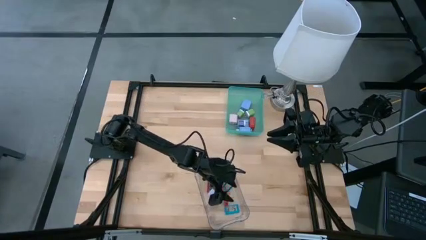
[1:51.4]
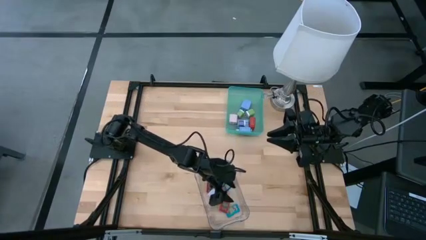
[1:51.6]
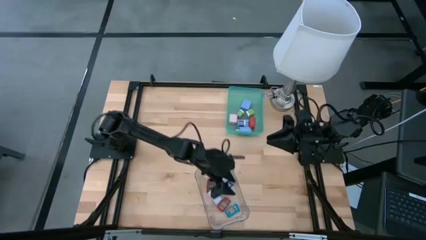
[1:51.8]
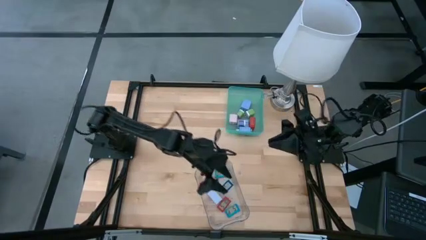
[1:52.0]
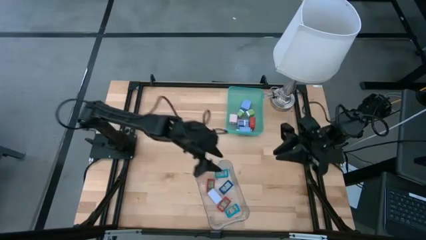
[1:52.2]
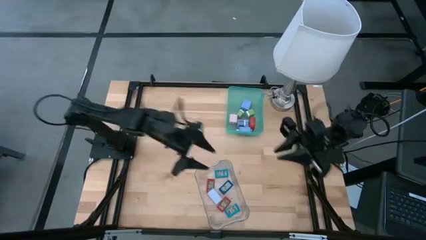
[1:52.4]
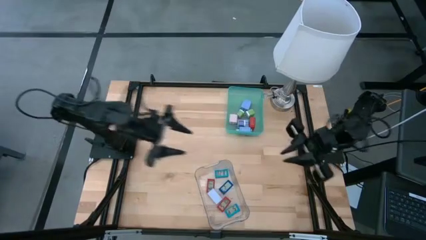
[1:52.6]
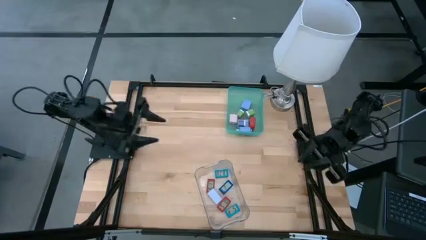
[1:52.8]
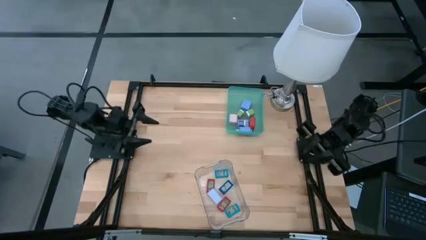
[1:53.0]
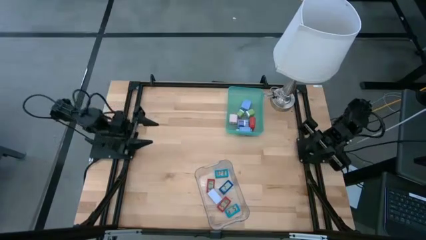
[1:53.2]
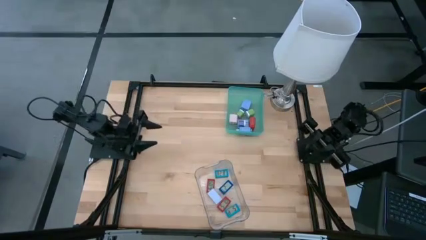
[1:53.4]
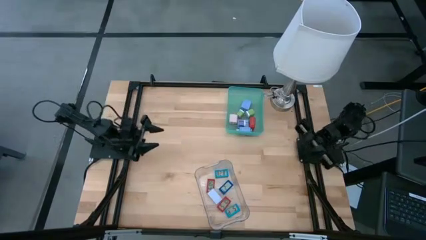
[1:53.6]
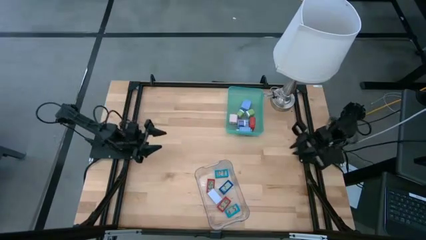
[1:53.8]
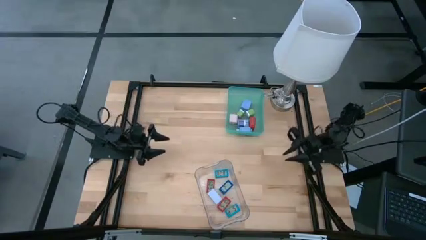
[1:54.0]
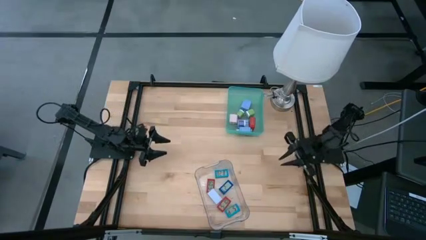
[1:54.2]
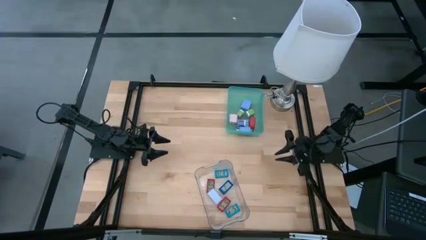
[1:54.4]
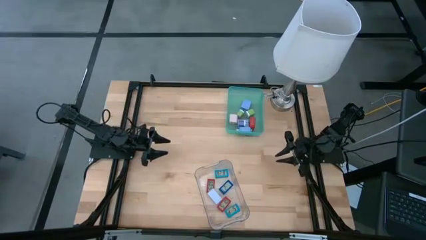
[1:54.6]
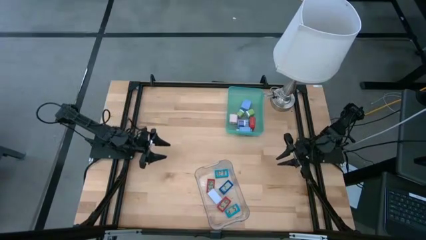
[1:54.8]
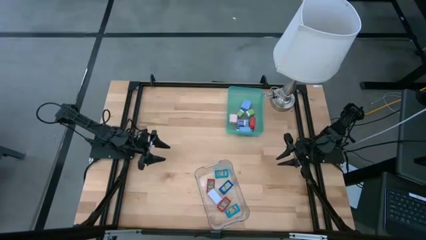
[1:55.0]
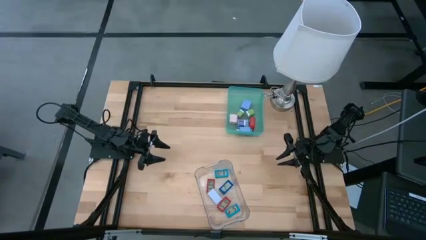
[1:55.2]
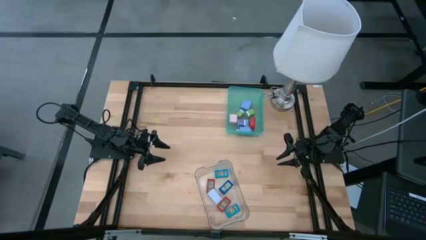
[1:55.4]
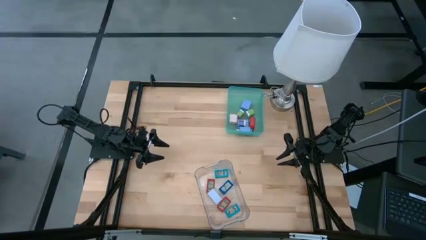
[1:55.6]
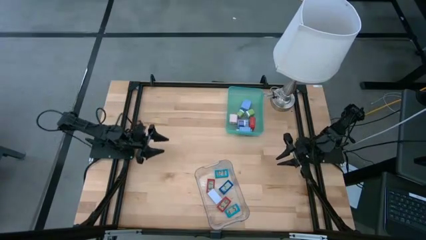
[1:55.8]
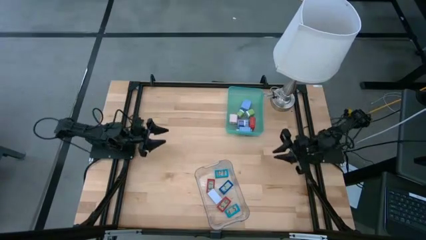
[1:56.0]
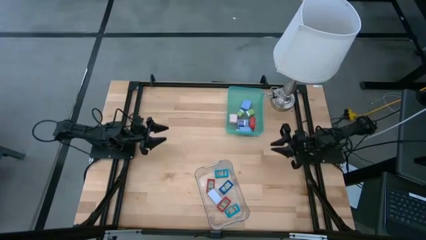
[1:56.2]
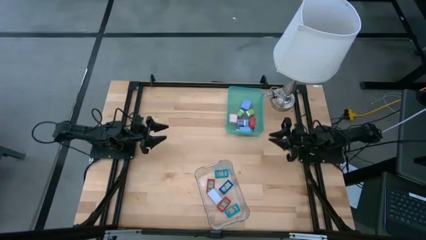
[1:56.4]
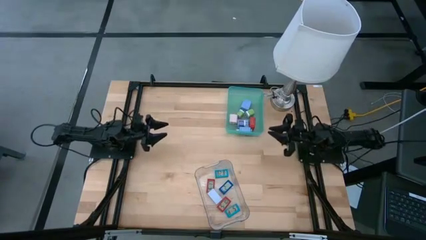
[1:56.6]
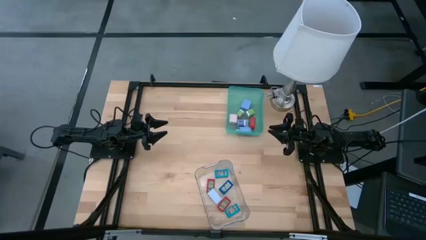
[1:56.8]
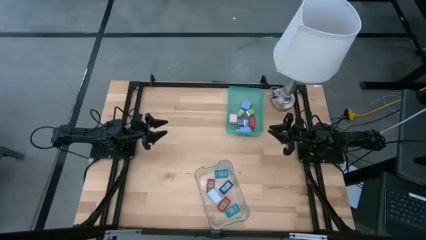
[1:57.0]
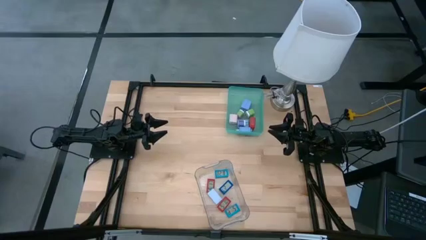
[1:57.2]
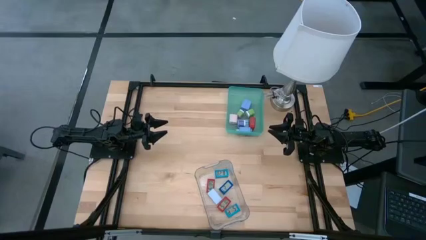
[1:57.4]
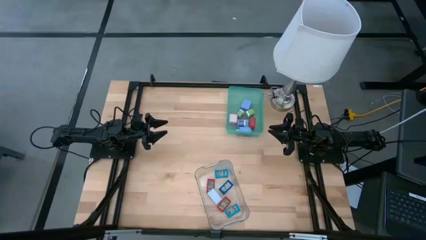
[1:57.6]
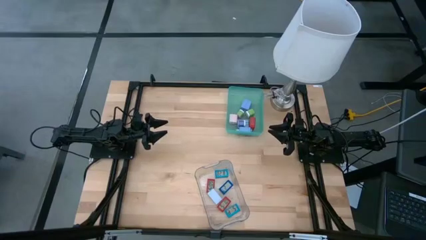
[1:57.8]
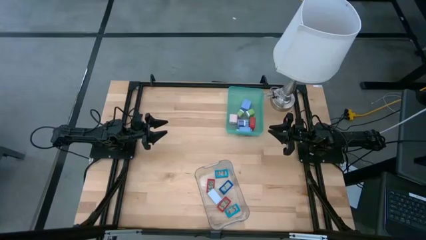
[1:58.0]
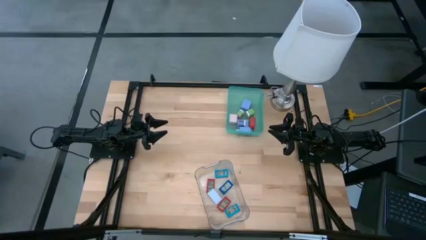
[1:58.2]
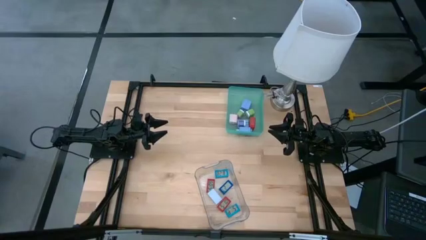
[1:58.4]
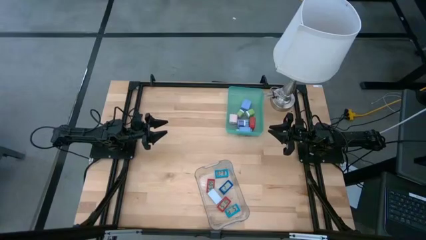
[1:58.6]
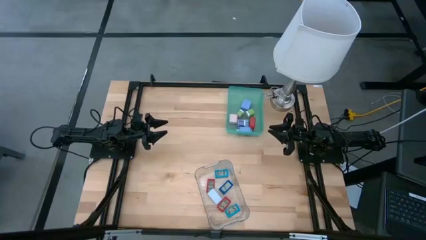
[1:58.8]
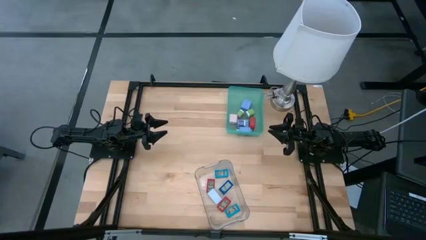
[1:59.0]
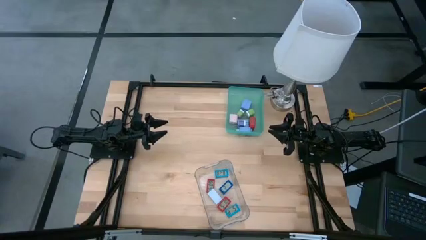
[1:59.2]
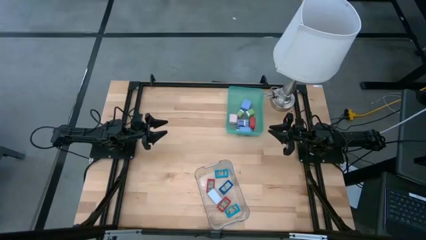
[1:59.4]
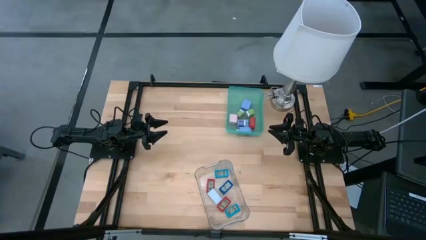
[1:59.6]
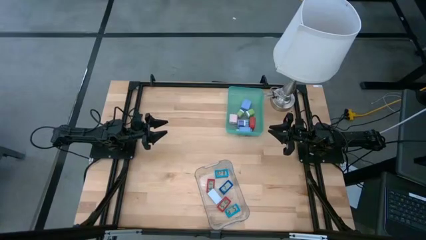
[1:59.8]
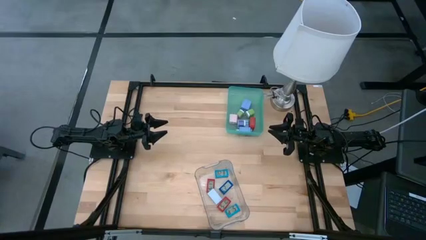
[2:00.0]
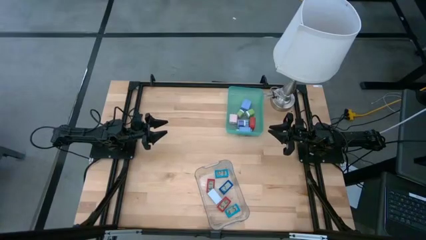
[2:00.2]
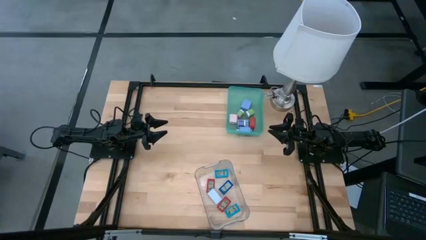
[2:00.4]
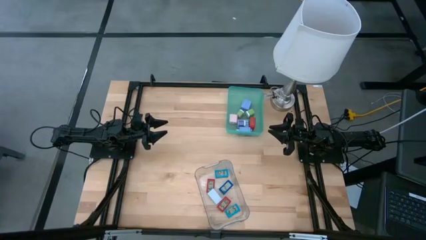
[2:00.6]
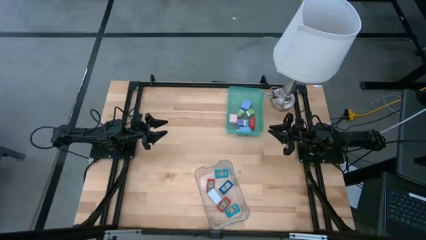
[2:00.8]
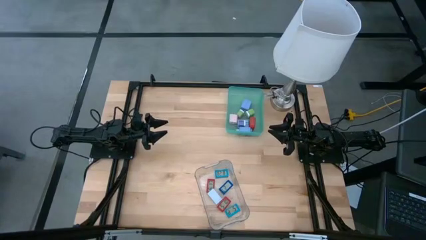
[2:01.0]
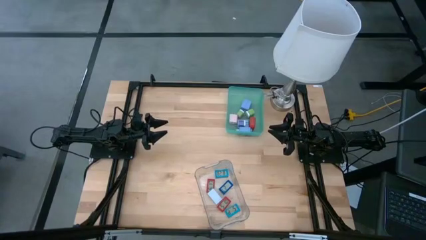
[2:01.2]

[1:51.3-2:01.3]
Task: Pick & Place Office items
Return to Home Position

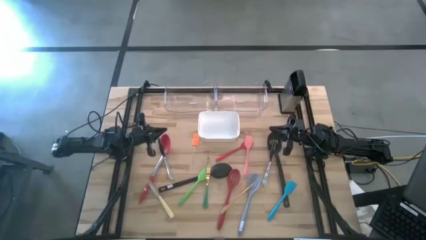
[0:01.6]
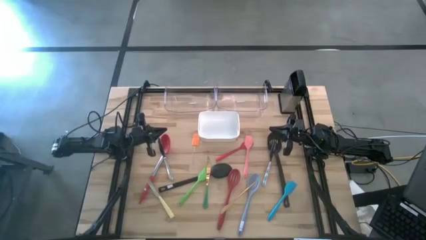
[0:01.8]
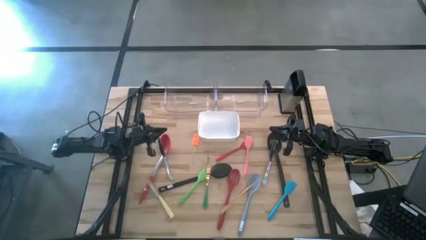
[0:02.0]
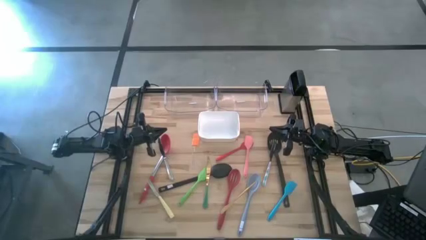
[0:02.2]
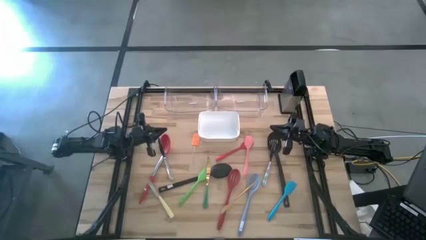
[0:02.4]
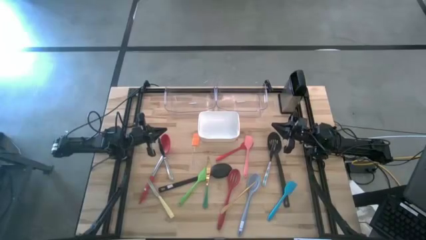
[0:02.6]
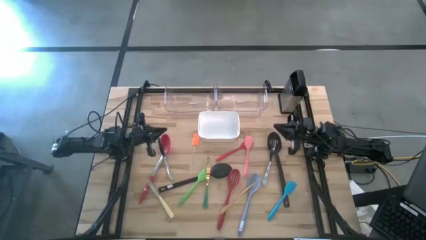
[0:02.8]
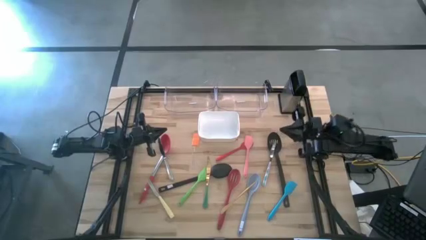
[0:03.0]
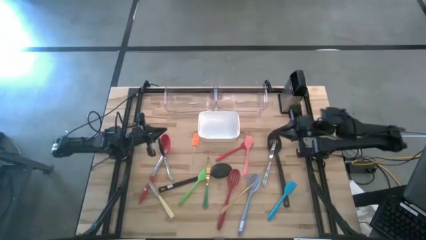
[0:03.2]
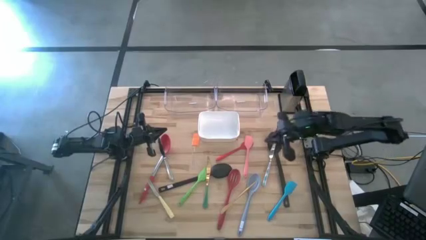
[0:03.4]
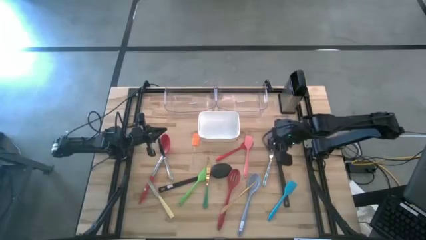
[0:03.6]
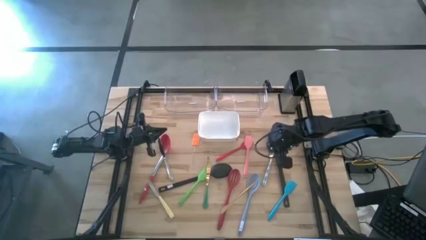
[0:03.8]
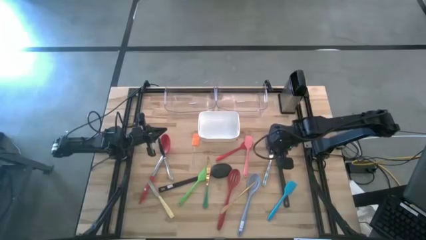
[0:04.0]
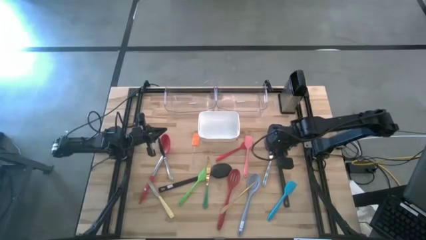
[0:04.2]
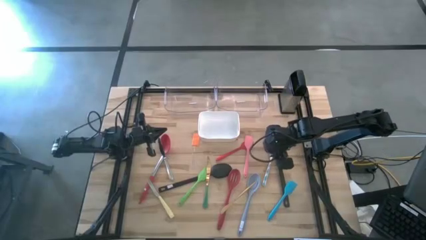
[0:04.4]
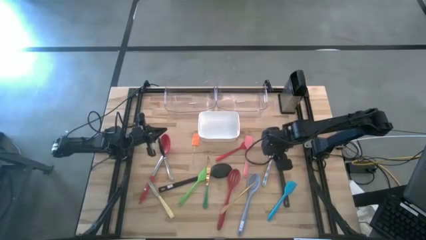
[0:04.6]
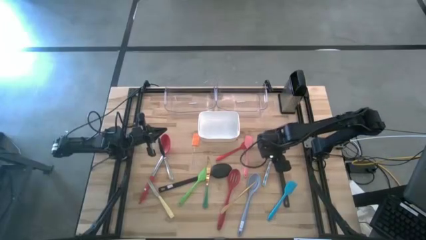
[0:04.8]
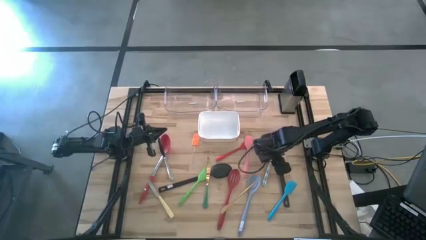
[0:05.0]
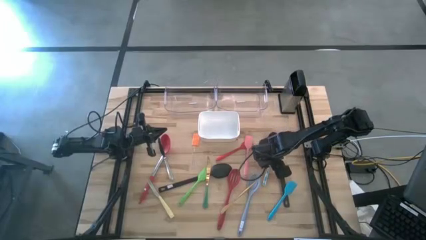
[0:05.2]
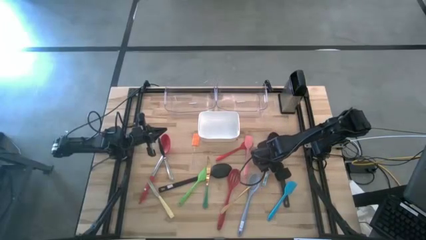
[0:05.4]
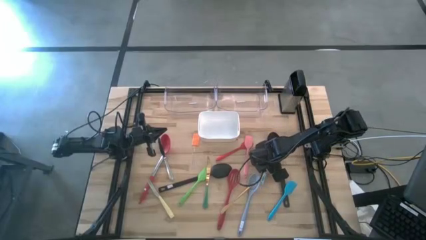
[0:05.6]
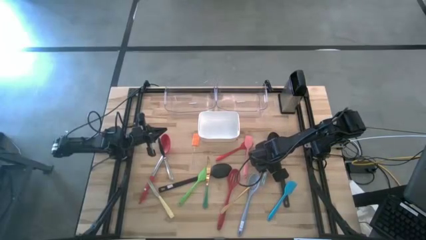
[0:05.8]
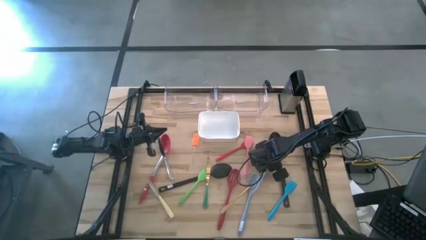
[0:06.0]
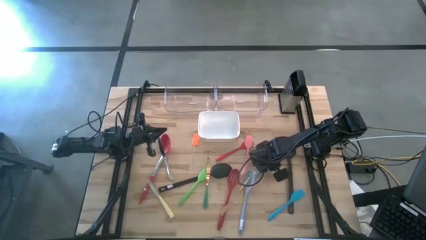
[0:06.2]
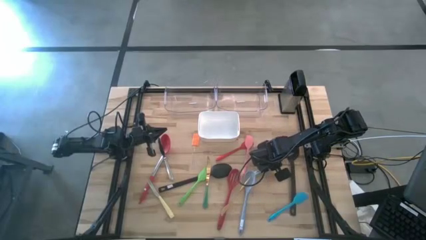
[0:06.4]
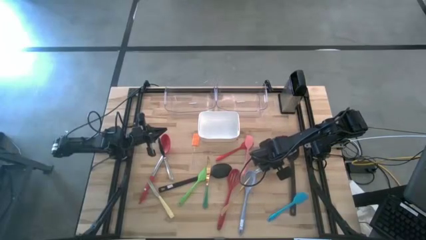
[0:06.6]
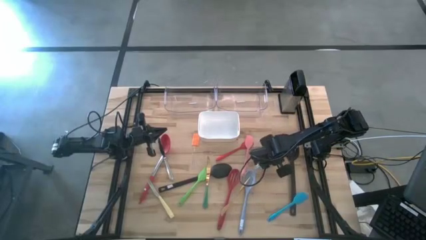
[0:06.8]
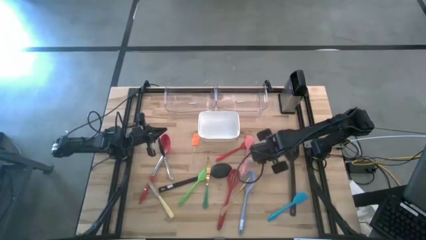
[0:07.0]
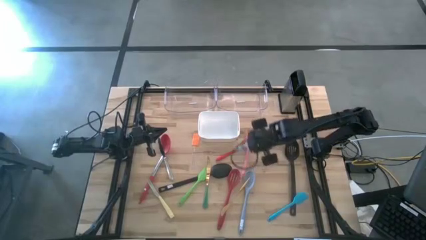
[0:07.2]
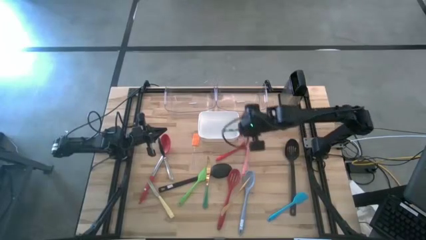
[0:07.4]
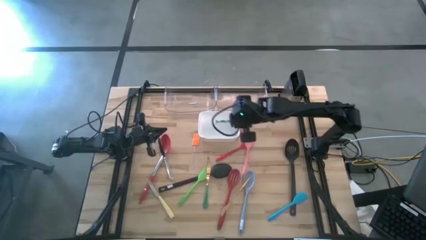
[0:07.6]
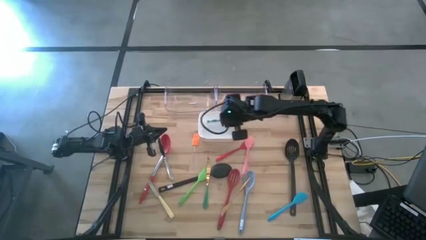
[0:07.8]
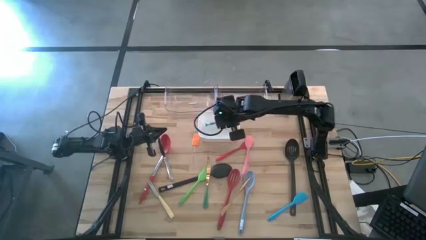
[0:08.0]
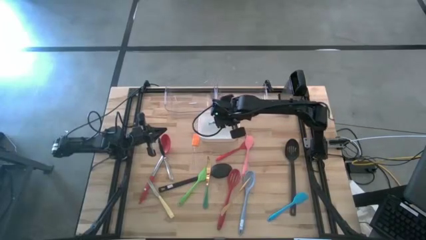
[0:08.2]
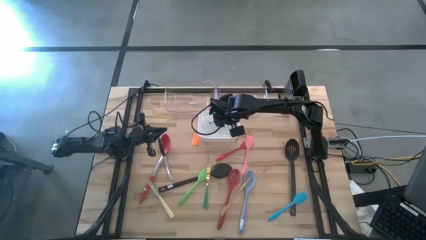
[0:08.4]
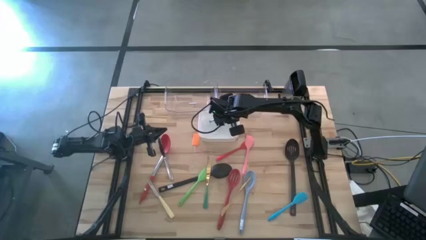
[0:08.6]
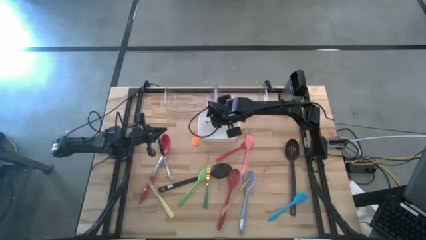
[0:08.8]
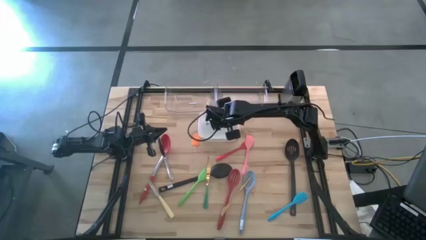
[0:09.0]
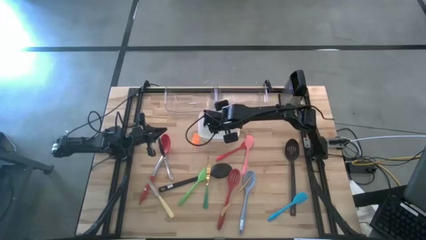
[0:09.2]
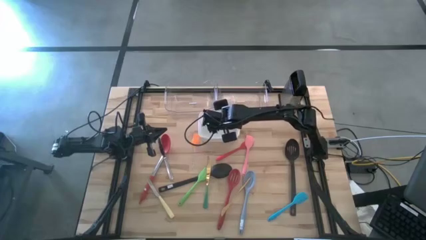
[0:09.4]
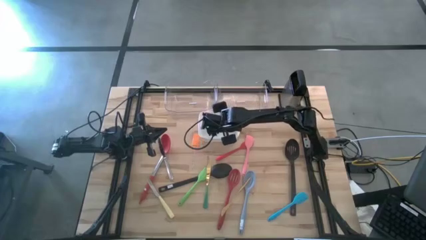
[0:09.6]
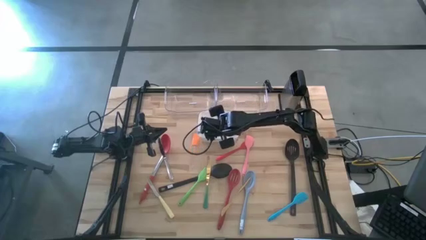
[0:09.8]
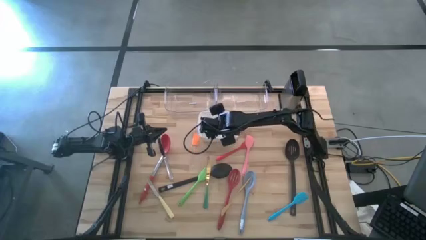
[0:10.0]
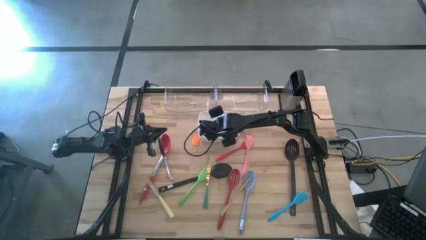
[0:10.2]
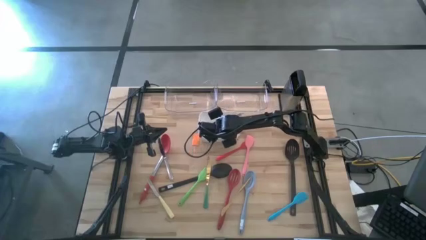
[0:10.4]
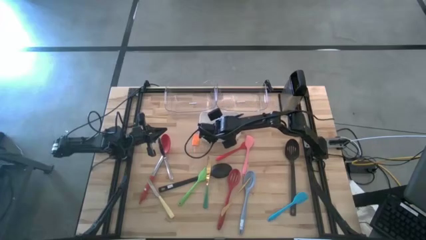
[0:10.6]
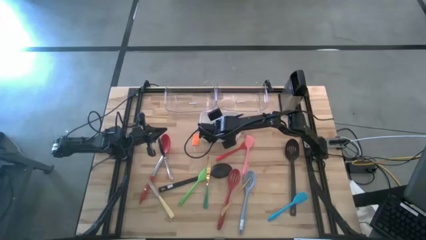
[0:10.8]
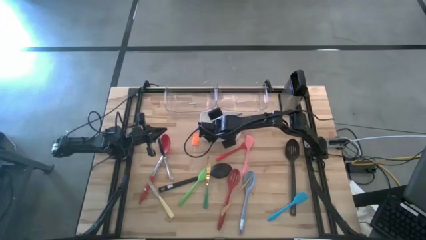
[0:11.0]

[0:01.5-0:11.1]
Task: Pick & Place Kitchen Items
Put the blue table knife into the white bin
